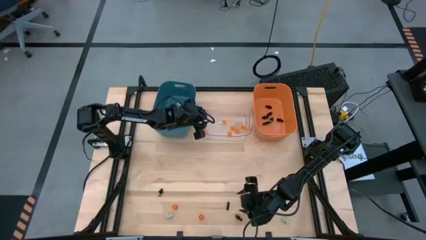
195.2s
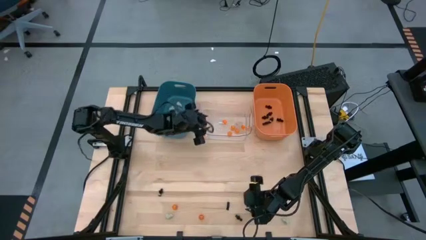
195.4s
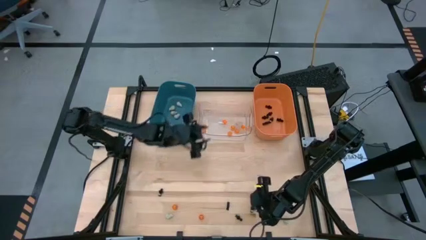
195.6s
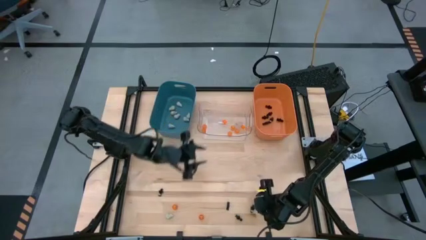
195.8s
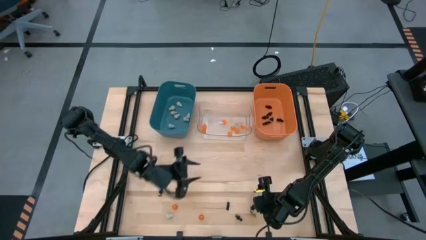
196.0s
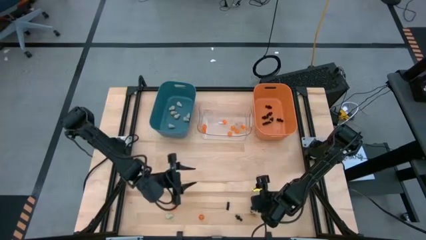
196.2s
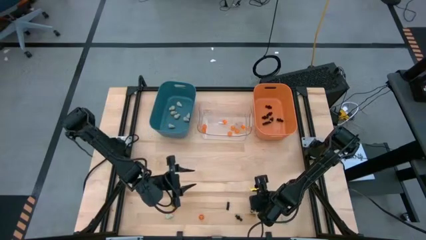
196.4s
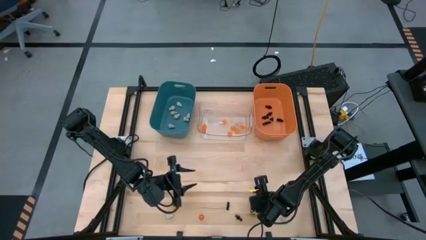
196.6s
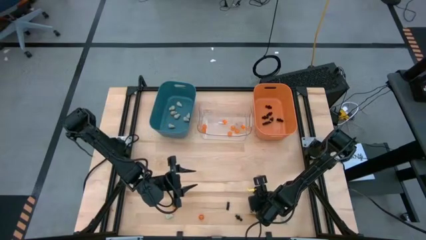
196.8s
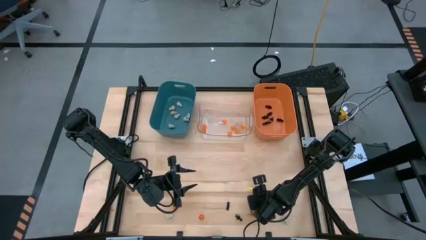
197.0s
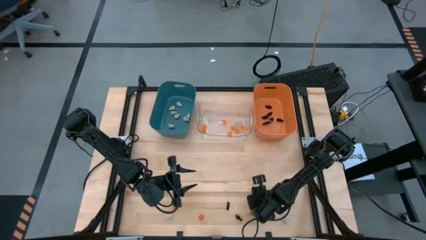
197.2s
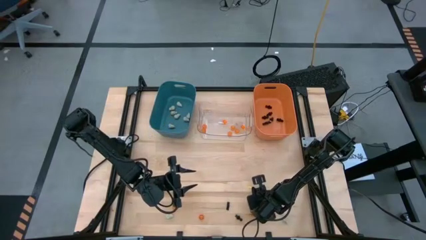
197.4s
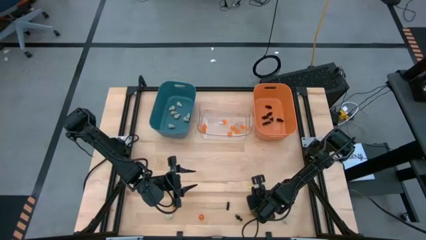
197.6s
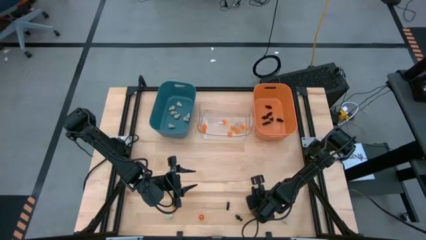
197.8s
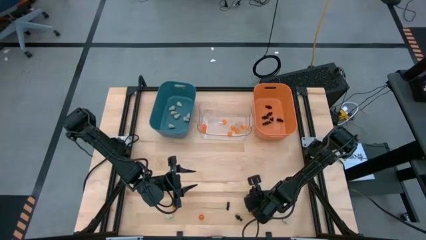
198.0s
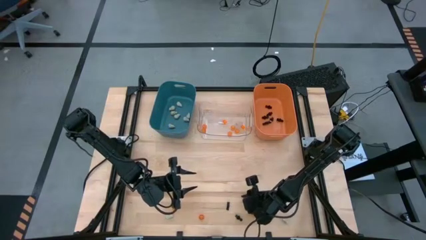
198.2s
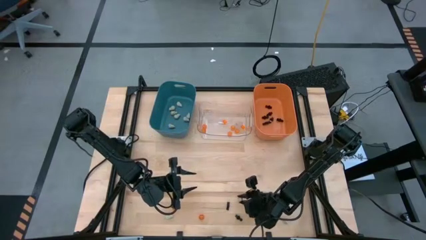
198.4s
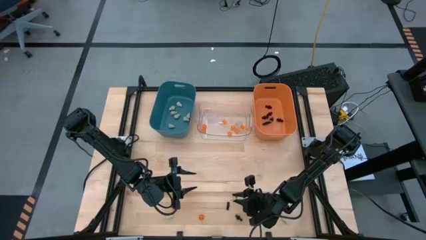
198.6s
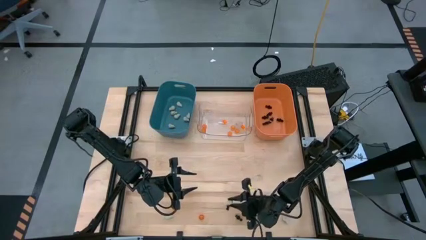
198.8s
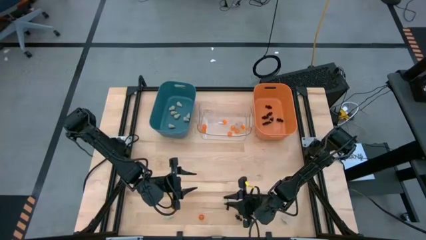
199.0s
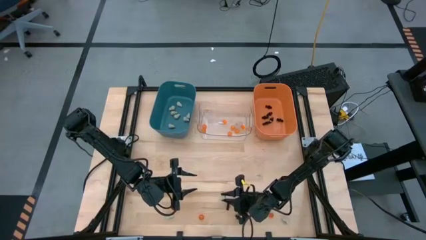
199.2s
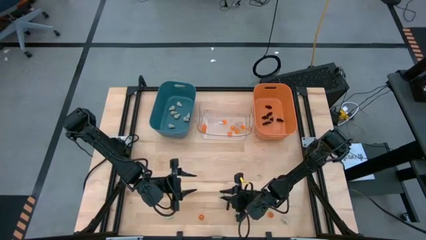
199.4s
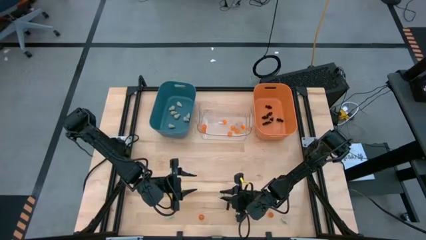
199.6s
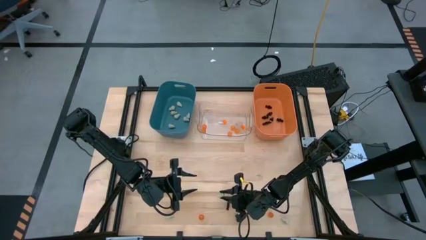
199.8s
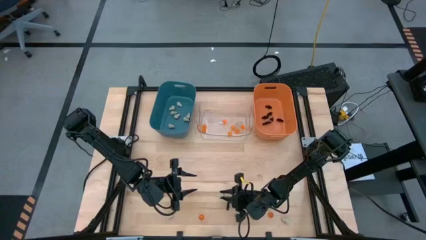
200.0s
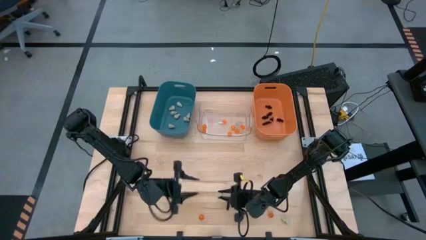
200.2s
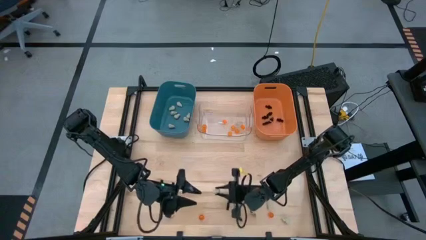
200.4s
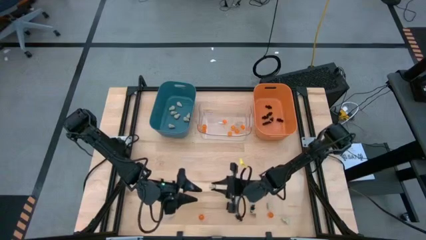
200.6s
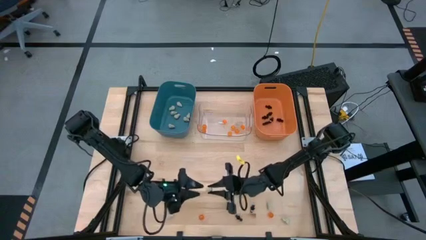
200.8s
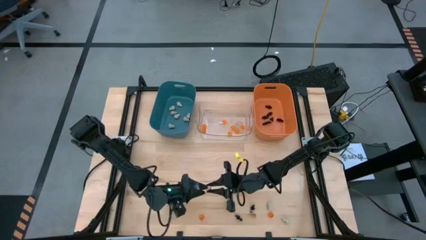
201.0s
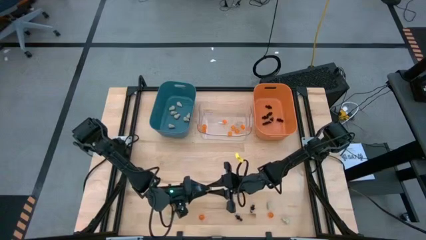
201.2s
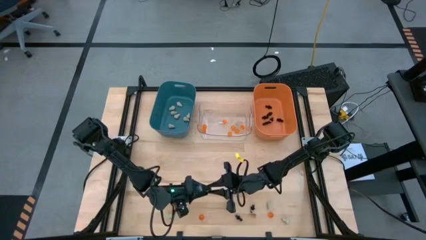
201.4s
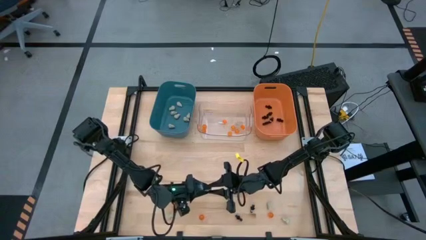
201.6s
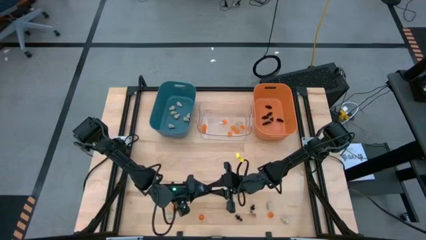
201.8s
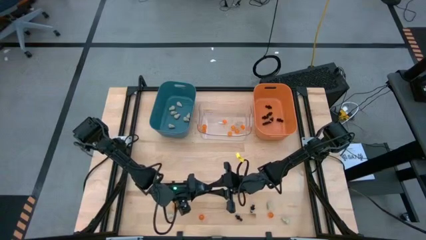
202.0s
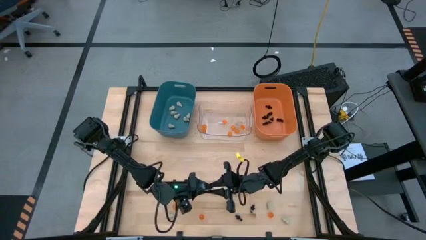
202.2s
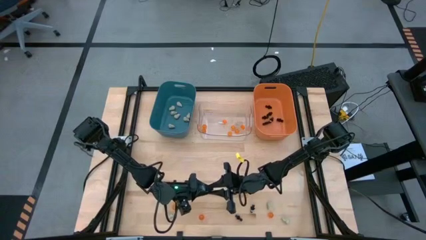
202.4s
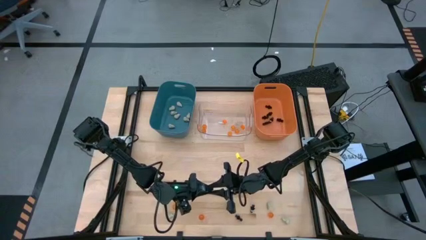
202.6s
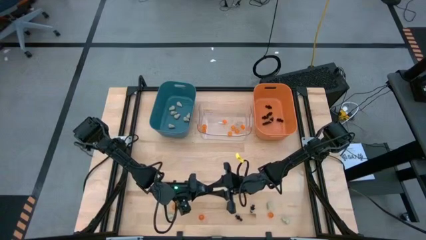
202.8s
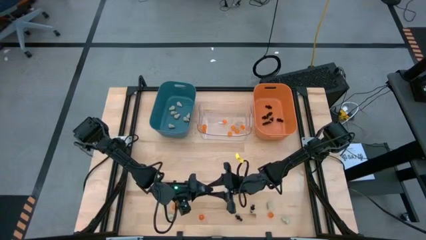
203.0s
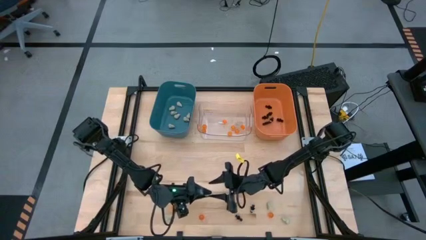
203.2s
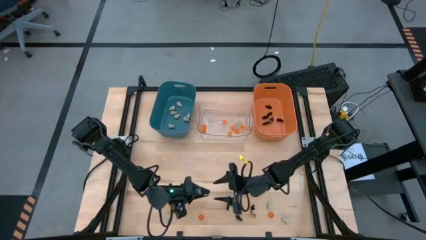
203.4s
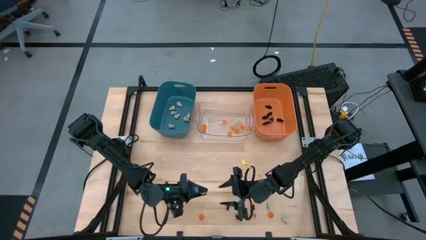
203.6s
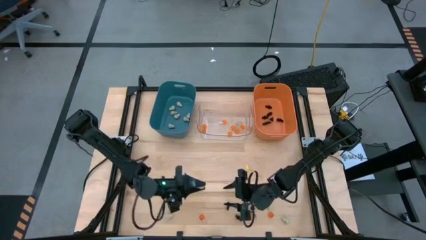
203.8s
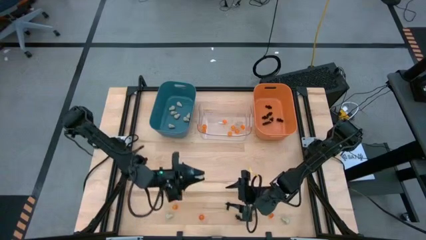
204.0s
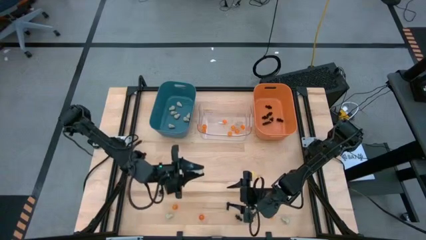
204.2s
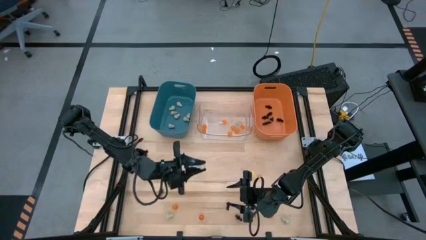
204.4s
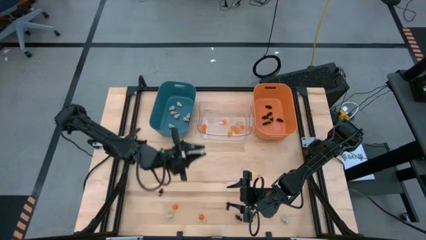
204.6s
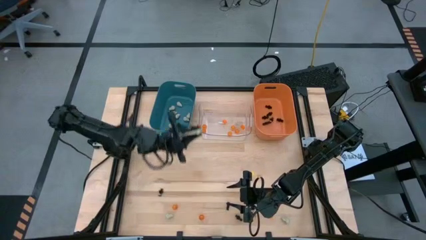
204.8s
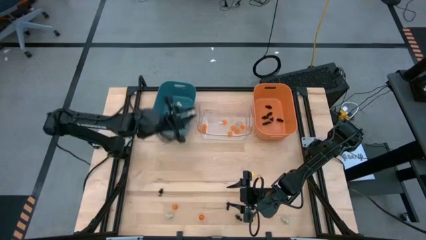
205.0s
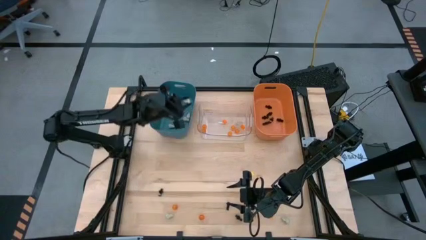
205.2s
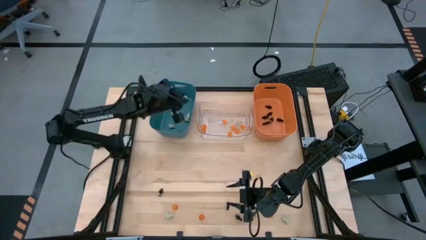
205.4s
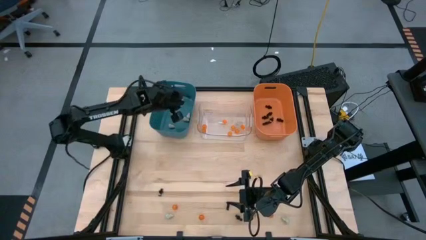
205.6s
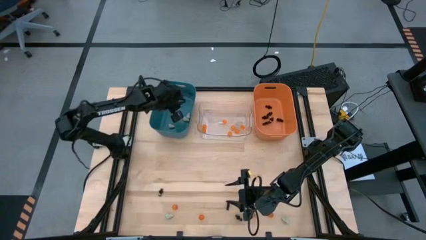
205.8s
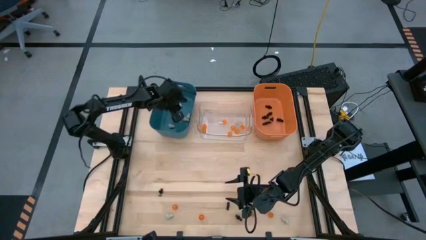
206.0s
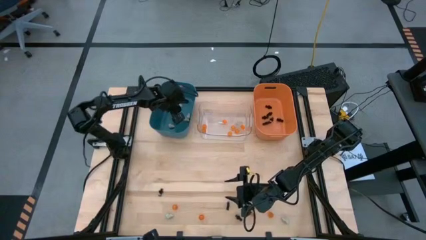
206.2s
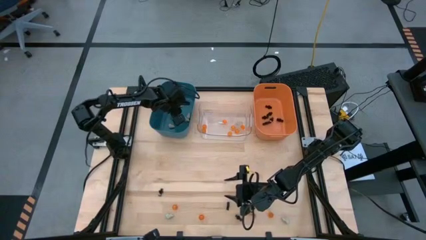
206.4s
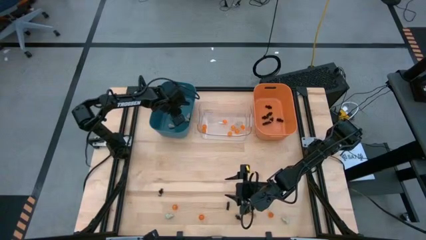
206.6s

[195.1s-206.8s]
Task: Sort Halloween decoration
Put the white skull toy into the blue bin

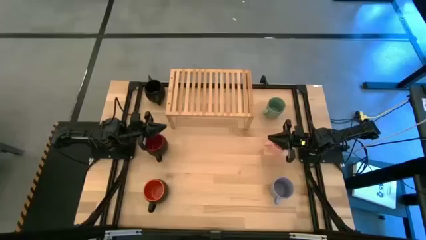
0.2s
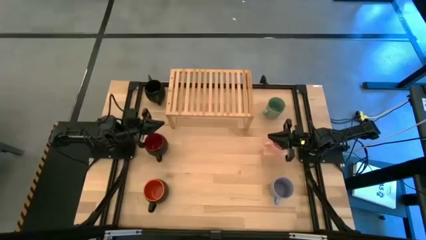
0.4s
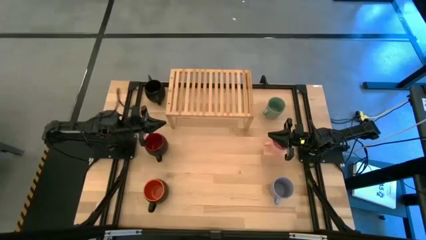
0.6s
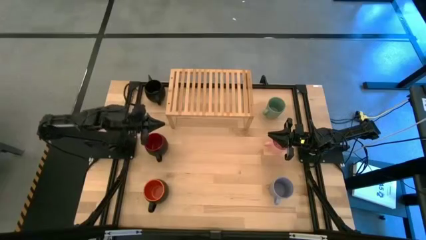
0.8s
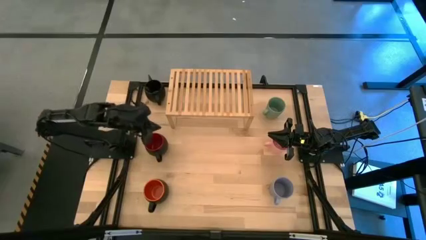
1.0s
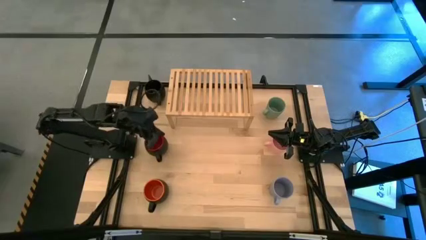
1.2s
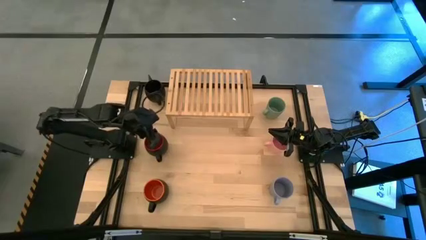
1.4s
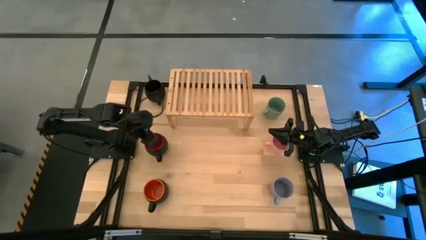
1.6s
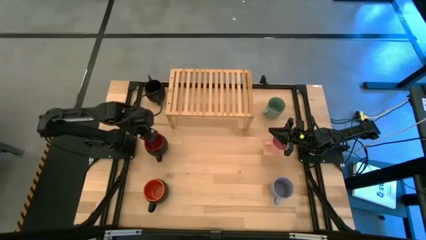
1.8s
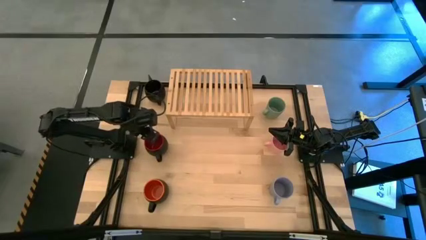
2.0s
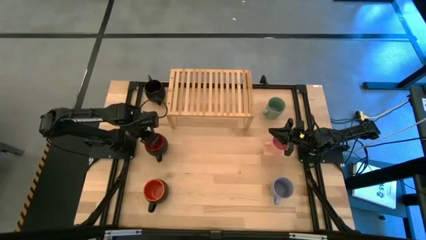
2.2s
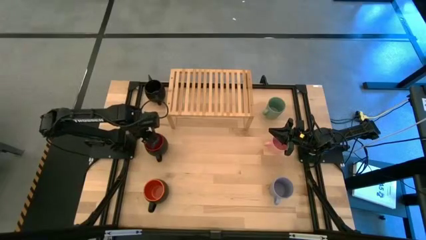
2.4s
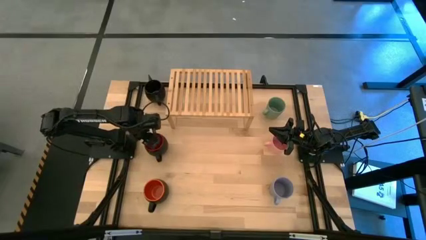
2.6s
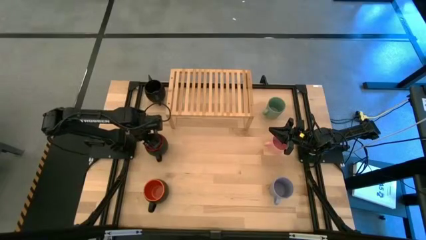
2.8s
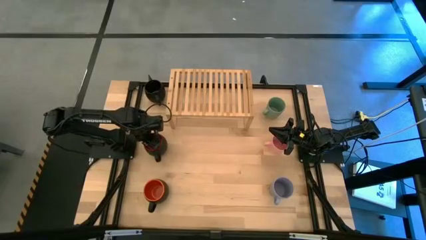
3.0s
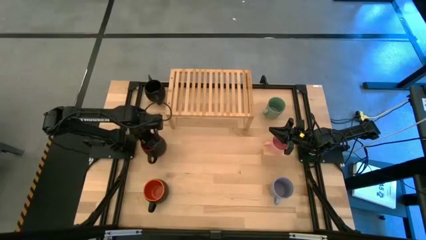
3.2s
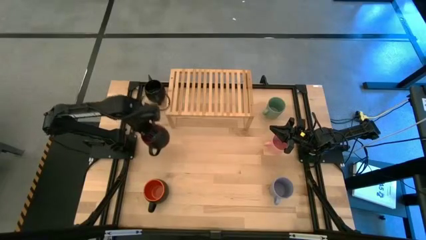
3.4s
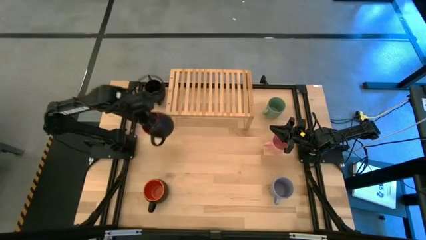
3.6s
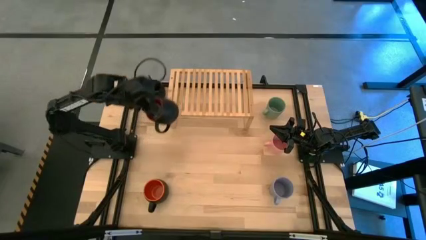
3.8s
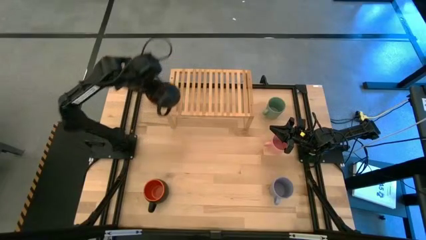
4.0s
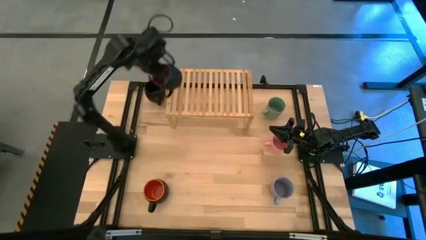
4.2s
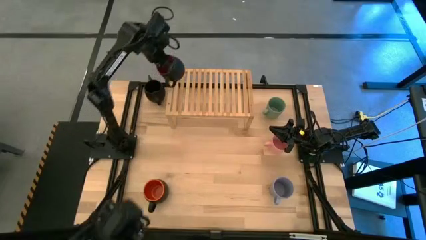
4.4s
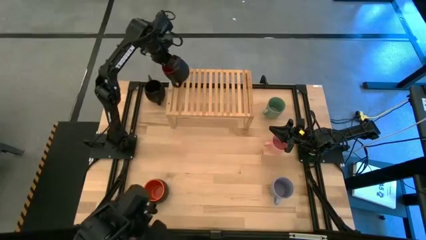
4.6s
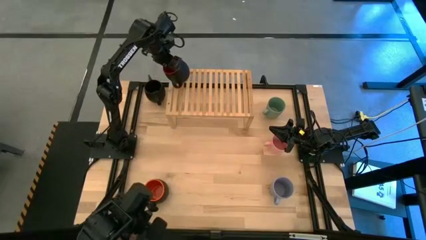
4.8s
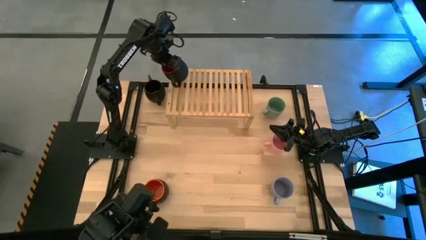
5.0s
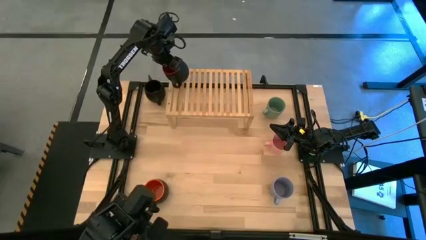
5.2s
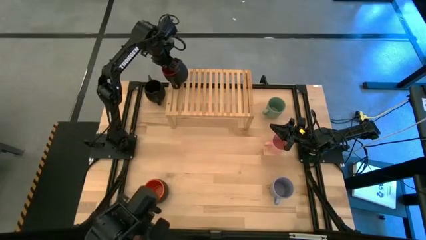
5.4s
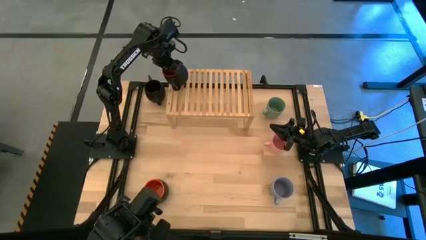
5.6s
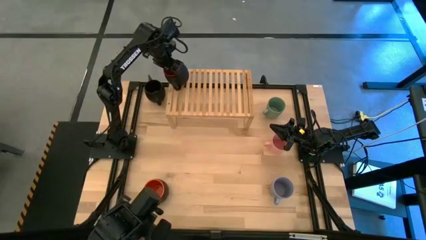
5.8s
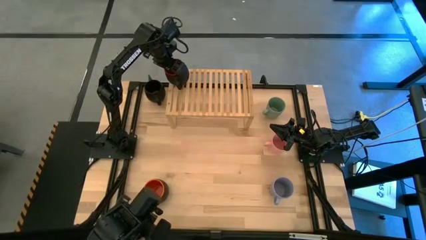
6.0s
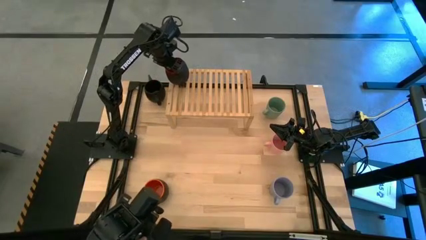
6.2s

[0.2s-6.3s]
Task: Place coffee mugs
Put the red mug on the shelf
